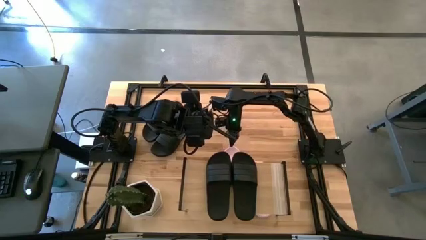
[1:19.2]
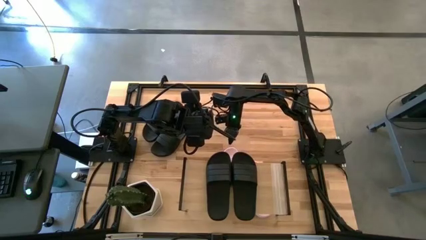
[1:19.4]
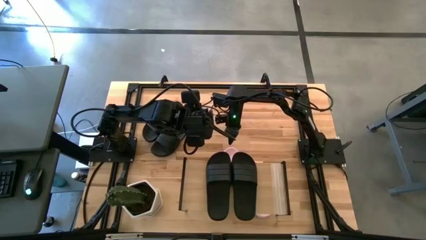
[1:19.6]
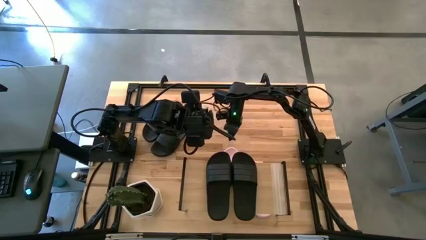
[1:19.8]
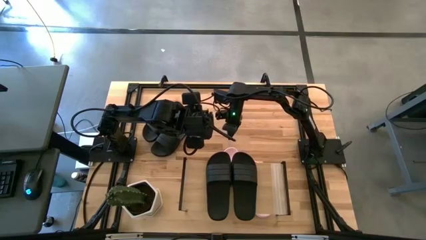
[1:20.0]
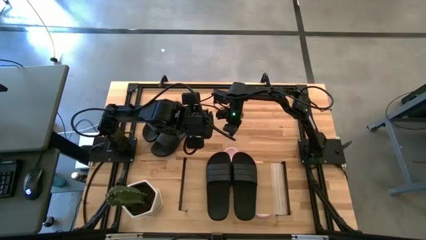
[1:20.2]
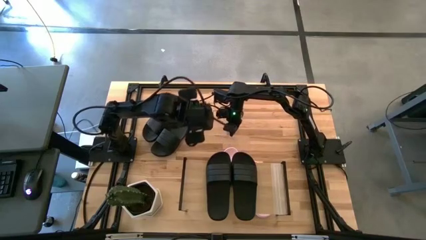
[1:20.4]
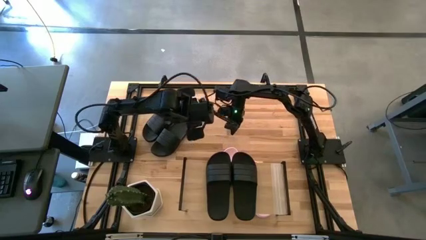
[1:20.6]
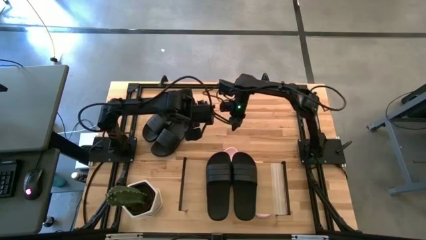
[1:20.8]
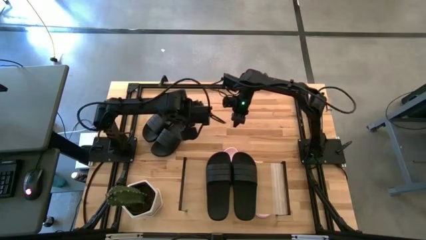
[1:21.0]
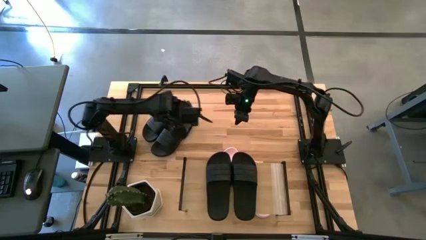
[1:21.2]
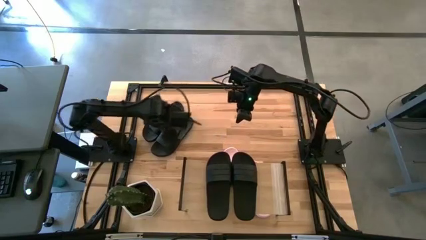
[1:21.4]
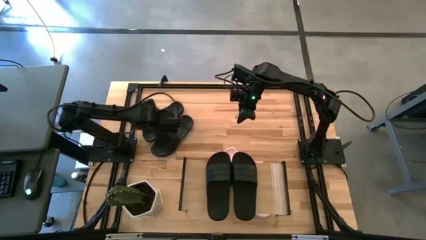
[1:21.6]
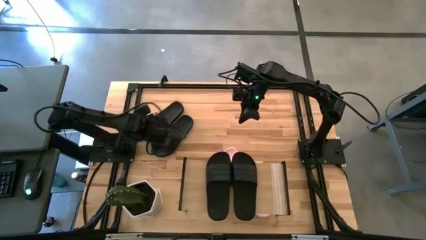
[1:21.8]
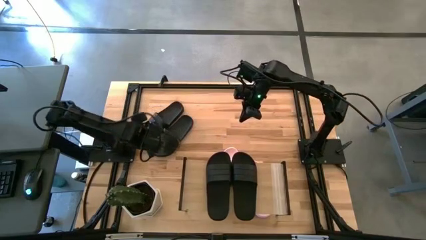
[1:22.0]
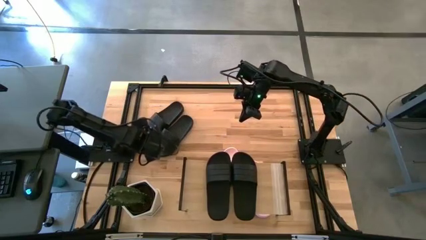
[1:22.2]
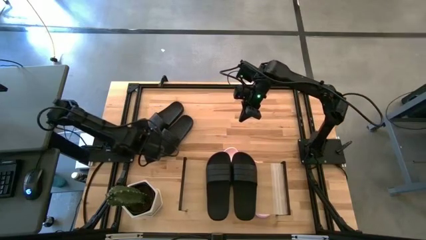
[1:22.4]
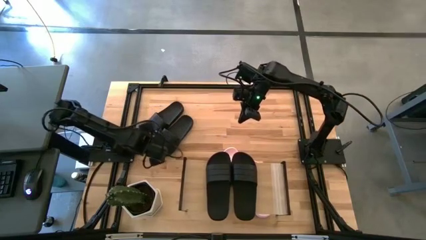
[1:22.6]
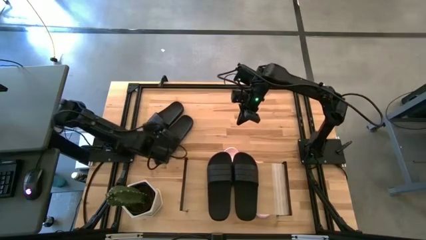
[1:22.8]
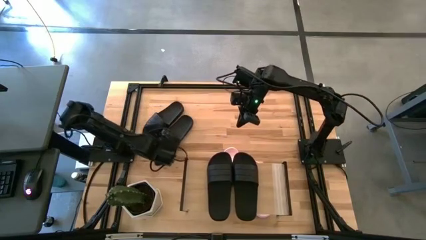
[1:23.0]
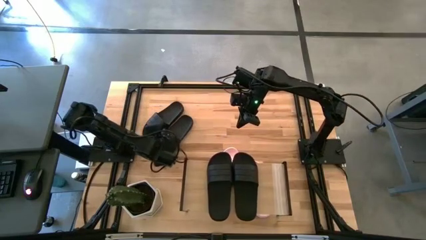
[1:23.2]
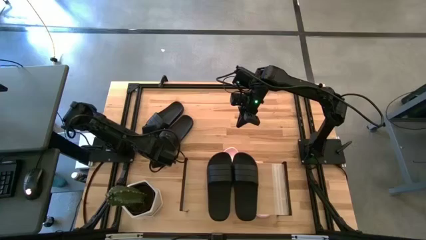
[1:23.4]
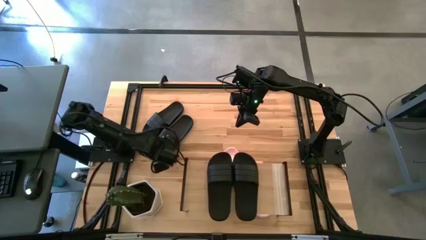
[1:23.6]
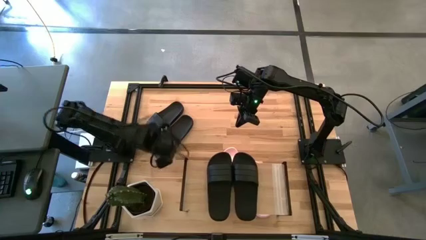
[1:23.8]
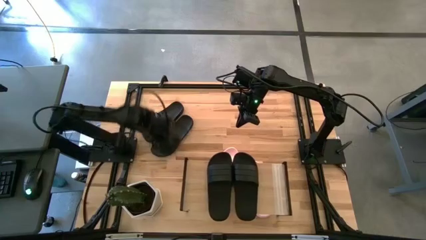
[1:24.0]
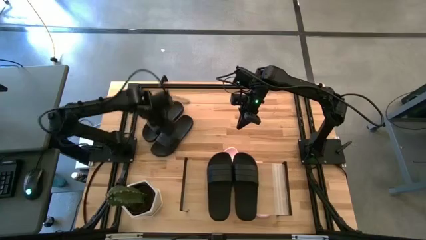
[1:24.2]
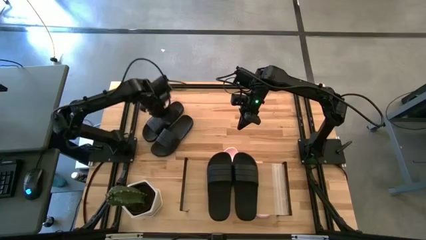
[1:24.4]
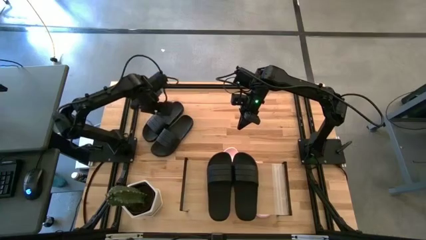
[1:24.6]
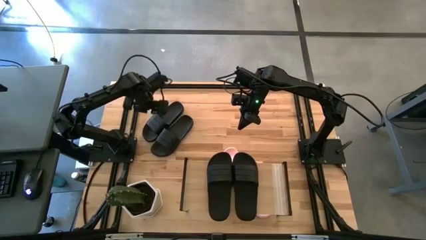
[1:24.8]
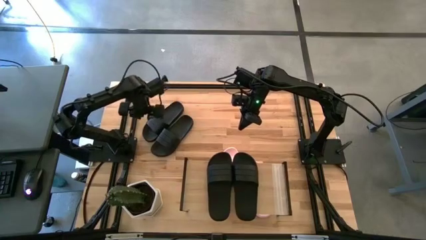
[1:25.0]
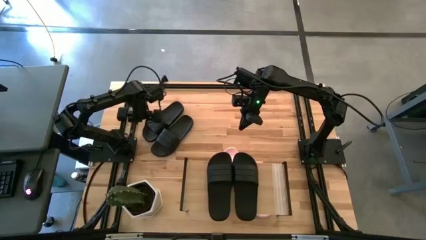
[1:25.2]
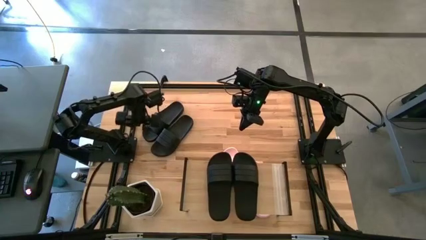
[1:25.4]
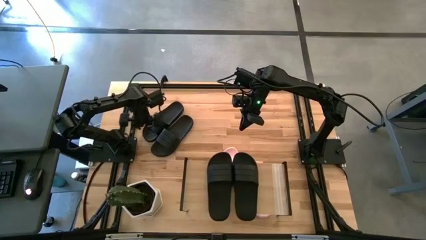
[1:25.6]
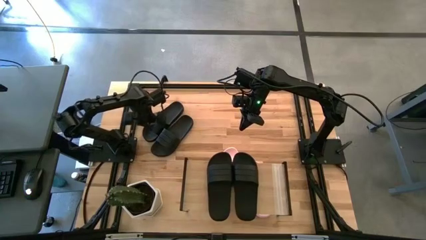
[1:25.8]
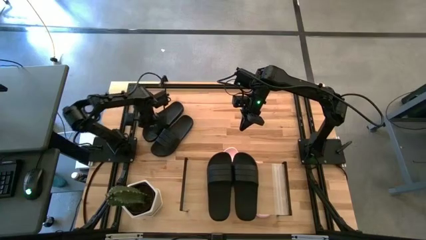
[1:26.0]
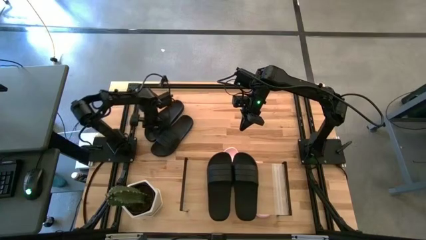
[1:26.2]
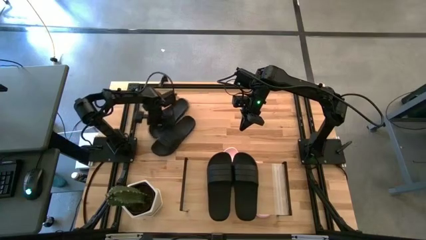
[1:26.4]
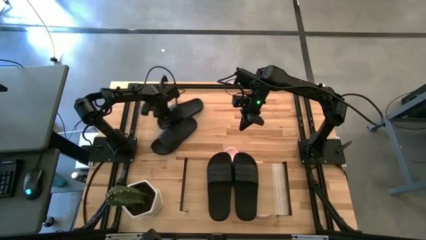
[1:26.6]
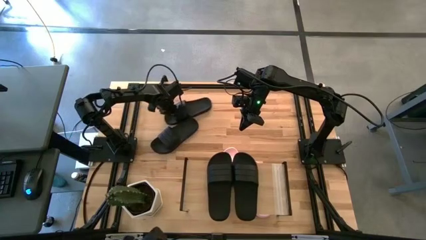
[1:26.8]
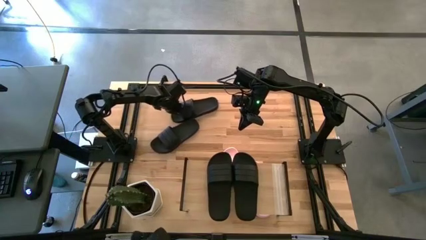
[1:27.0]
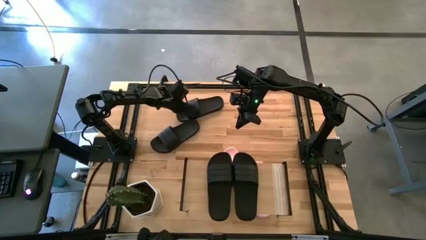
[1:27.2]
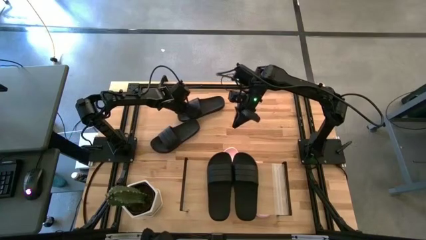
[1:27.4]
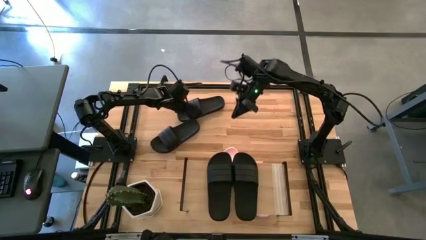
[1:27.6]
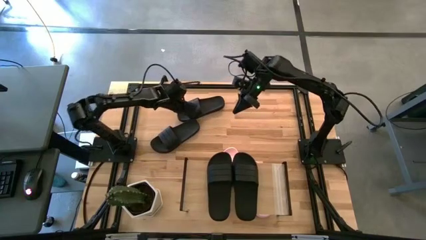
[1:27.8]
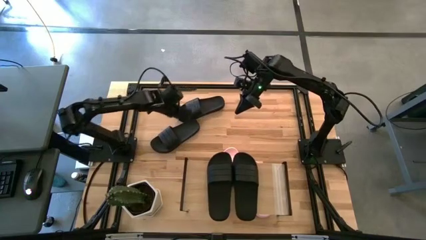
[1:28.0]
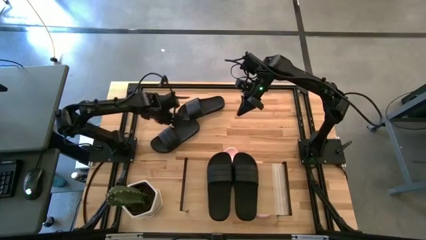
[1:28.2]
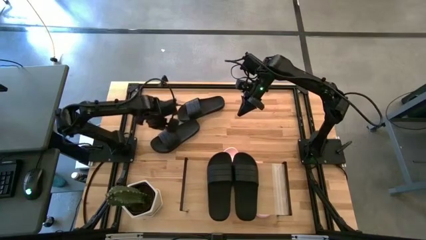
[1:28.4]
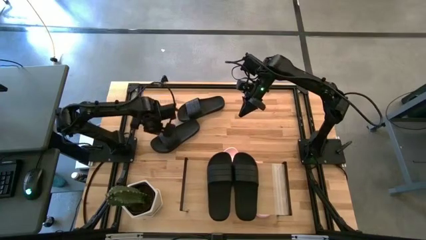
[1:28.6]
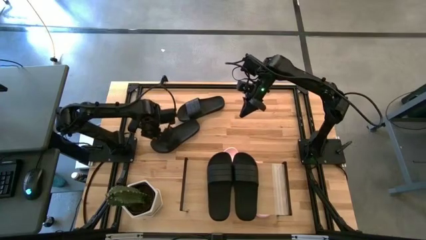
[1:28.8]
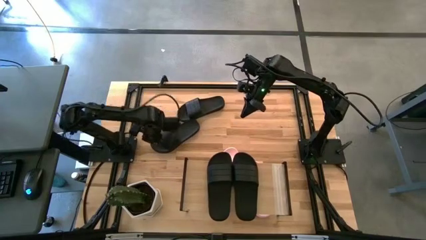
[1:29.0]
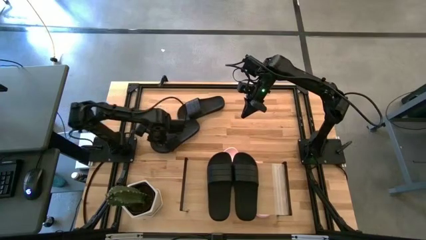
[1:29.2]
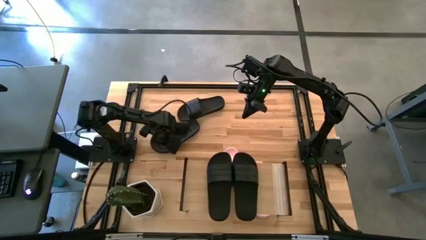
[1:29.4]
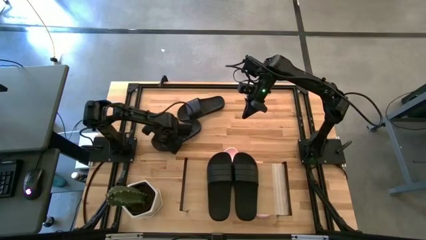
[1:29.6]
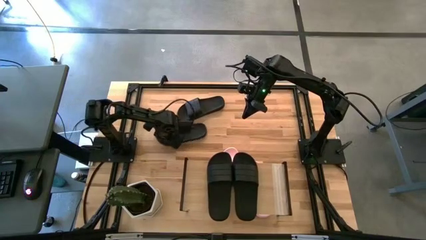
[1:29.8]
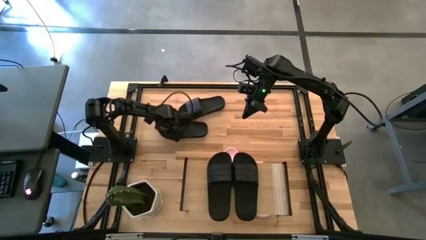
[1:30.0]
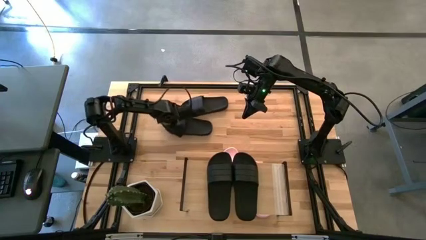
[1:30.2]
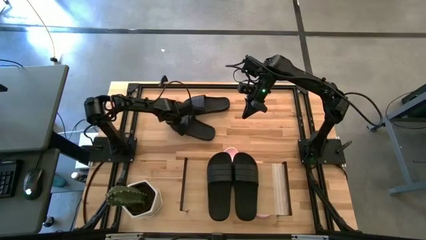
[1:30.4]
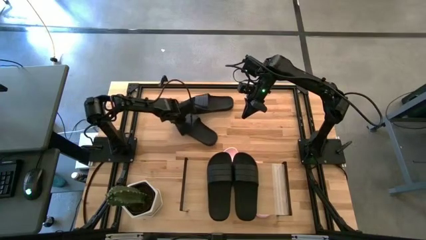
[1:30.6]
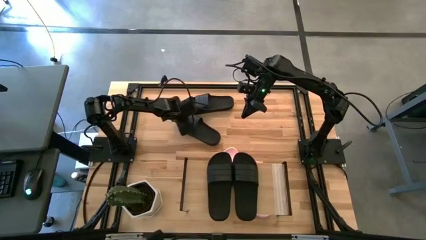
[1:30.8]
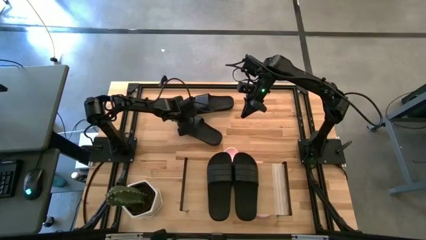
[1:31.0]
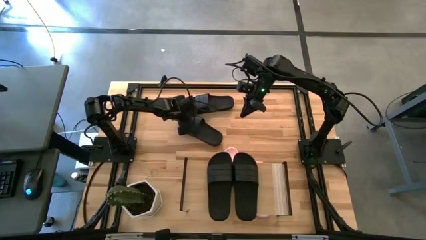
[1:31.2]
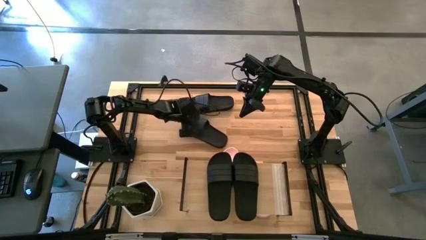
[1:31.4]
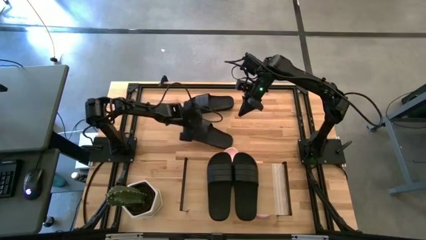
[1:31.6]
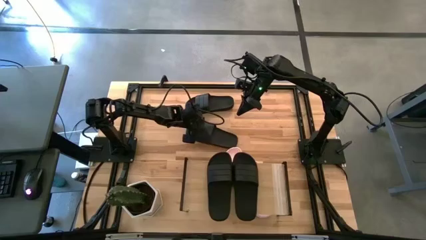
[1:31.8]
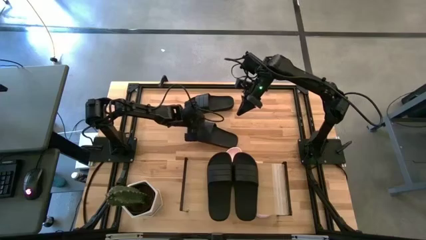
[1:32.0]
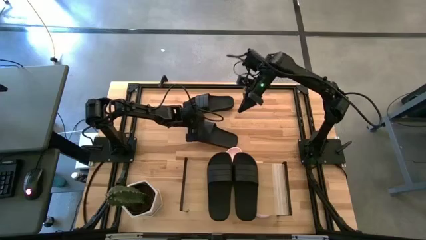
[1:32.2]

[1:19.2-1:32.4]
Task: Pick and place slides into the shelf
Move the black slippers to the center of the table
